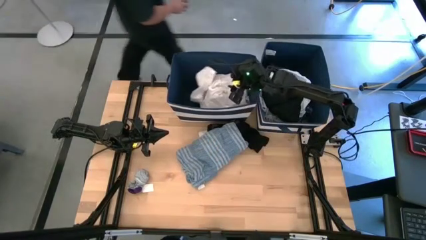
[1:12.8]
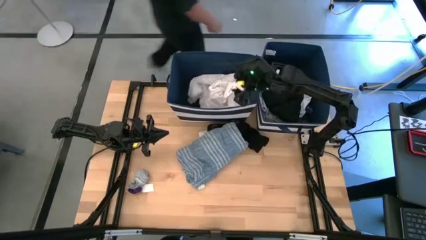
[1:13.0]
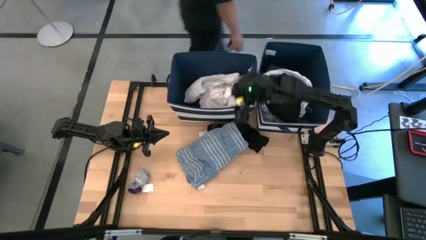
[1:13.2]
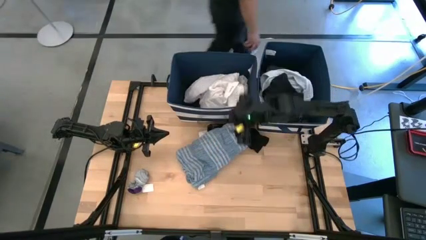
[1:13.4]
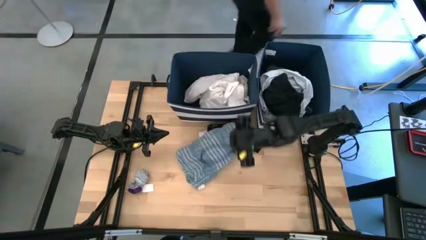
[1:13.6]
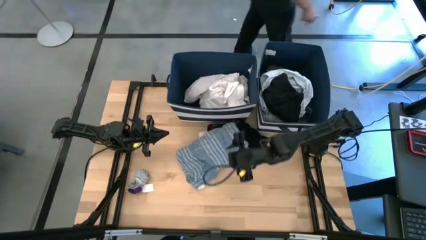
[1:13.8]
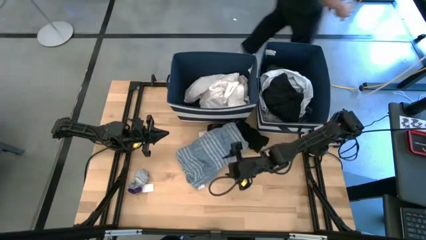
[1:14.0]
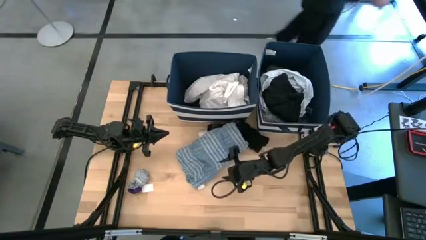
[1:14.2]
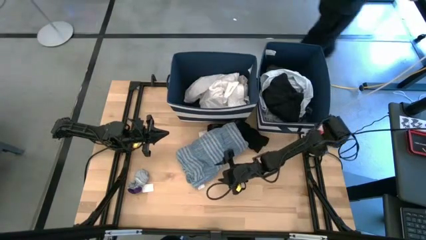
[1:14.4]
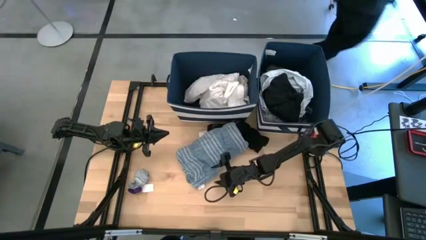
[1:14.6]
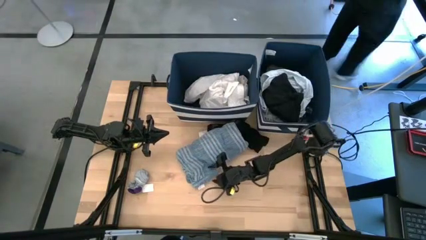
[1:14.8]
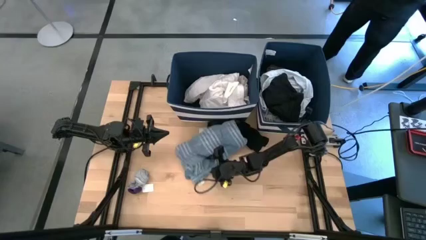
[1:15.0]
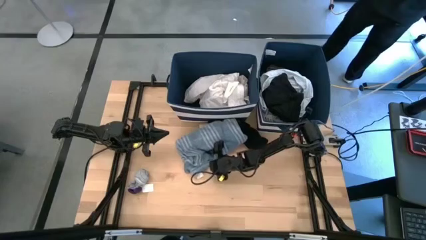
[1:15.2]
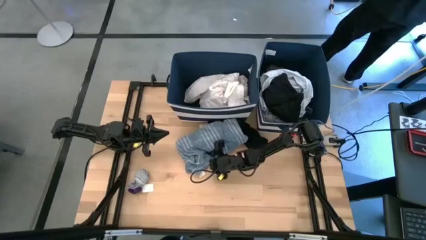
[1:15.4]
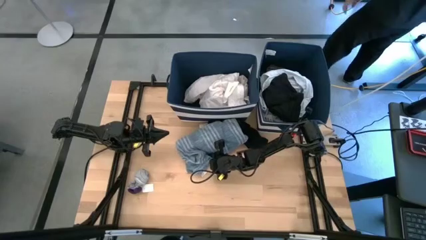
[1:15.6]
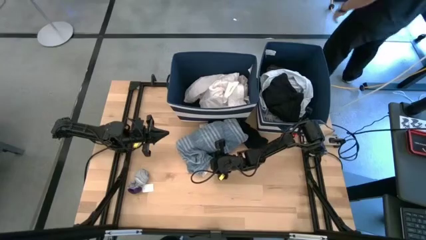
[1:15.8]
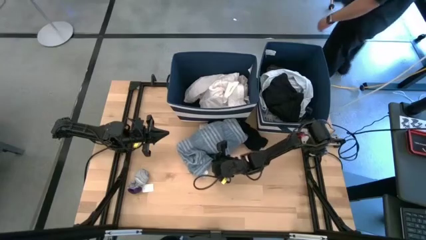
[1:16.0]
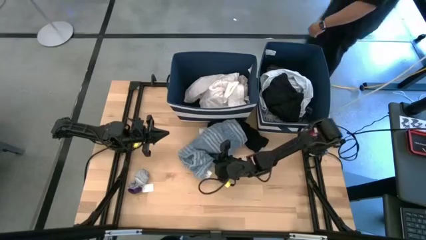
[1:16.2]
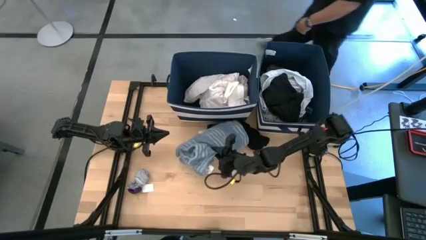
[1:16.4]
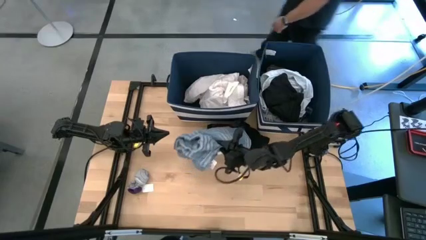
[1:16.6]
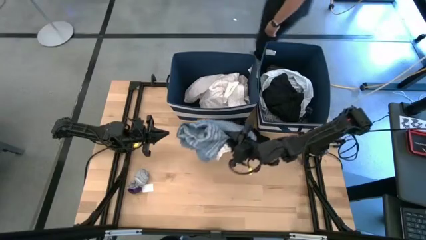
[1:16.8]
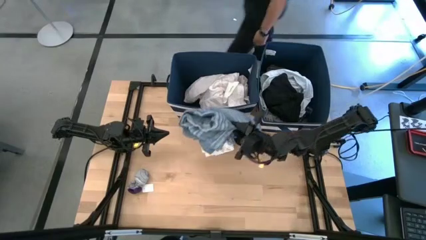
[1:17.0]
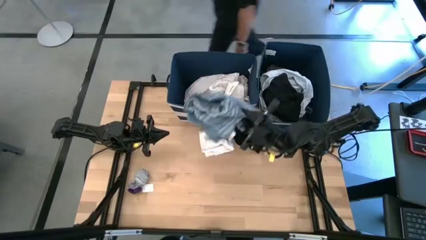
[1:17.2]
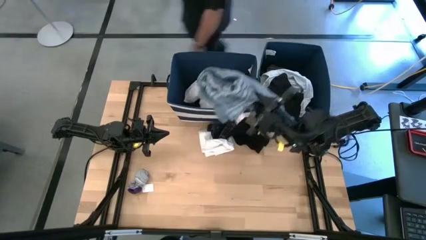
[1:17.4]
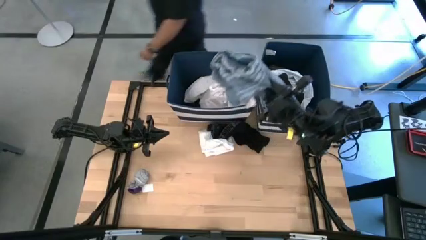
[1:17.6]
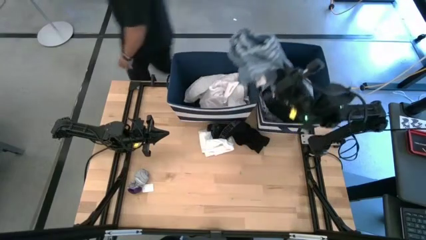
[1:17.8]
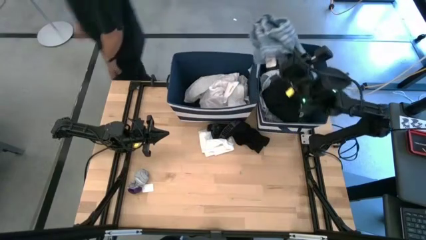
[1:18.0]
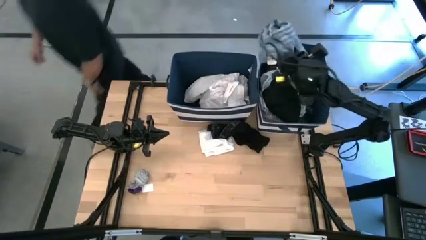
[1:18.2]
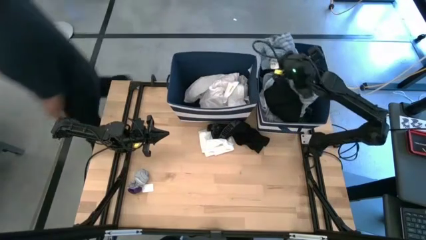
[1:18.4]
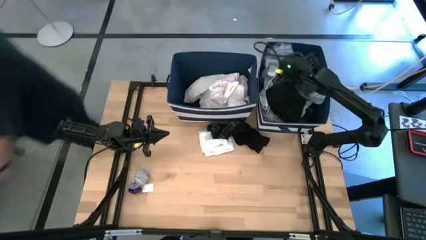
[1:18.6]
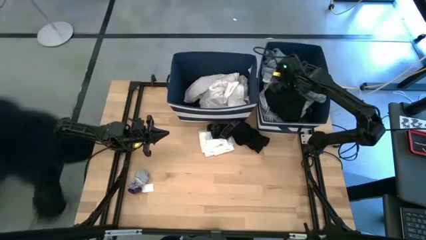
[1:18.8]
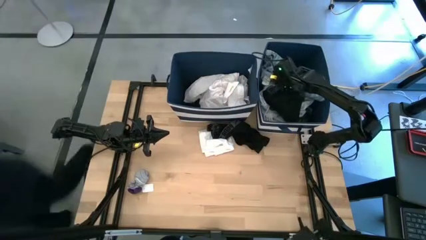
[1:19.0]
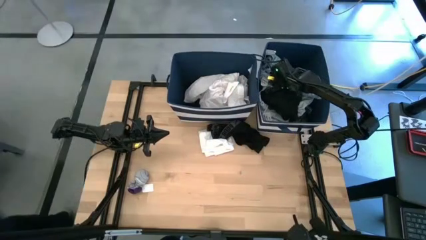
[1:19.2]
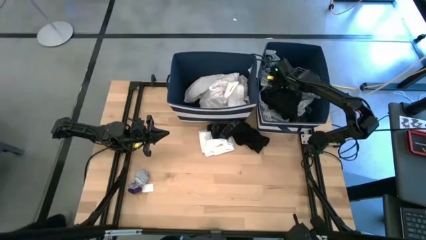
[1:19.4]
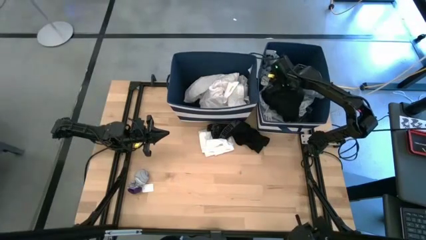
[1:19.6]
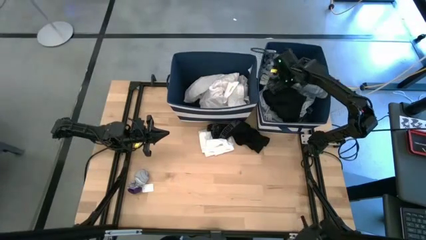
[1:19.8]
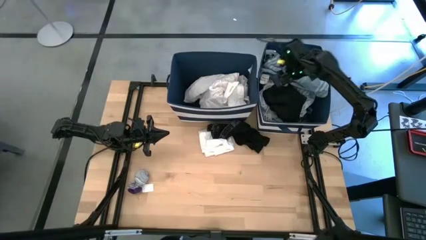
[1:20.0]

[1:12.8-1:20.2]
Task: Sort clothes
Put the light blue checkered polo into the right blue laundry organizer

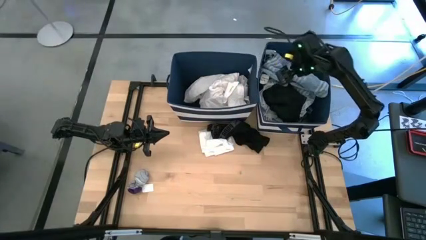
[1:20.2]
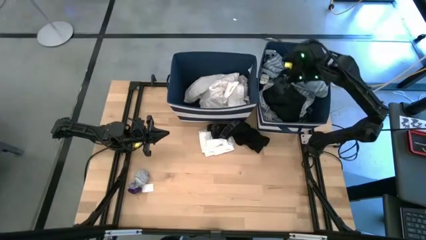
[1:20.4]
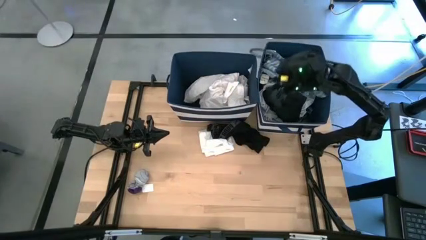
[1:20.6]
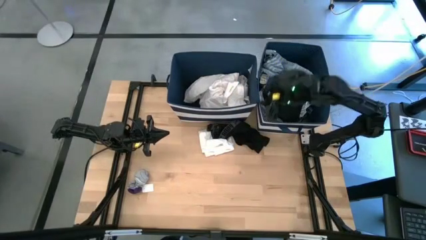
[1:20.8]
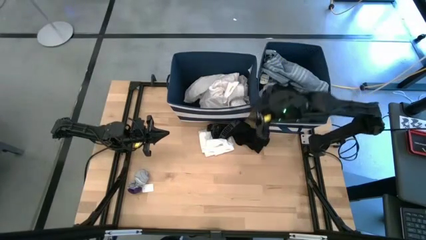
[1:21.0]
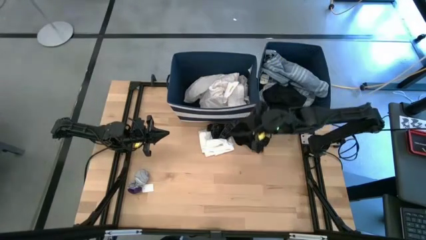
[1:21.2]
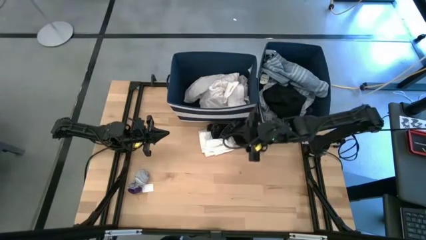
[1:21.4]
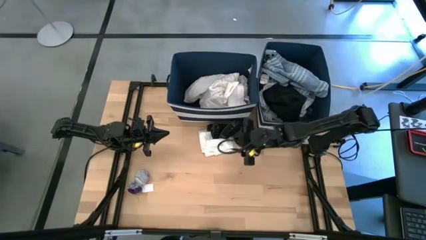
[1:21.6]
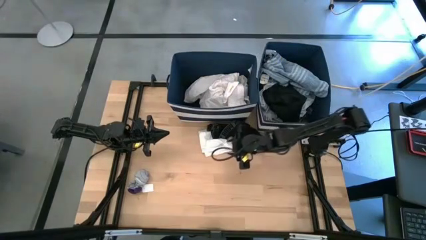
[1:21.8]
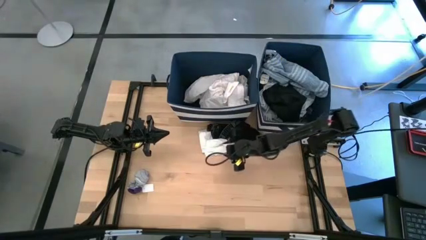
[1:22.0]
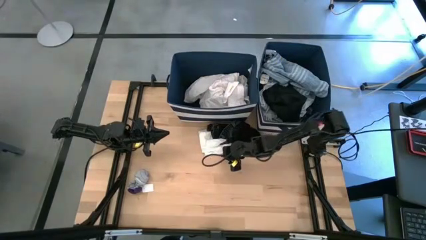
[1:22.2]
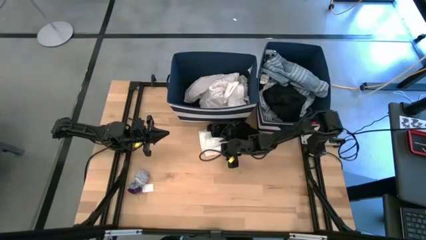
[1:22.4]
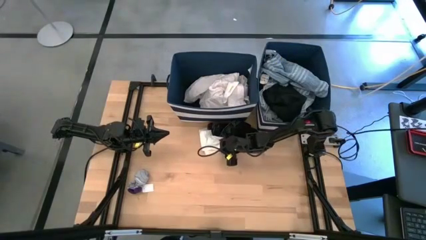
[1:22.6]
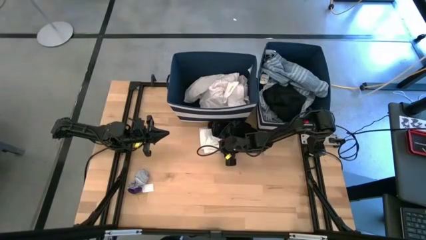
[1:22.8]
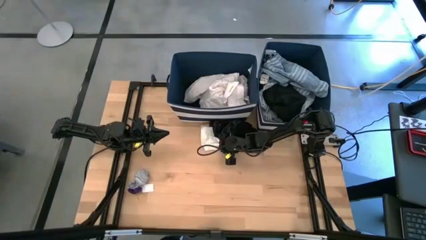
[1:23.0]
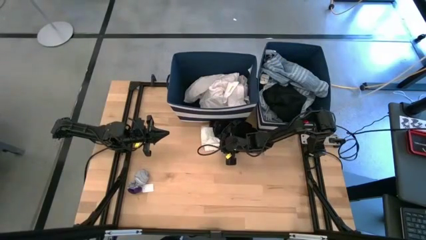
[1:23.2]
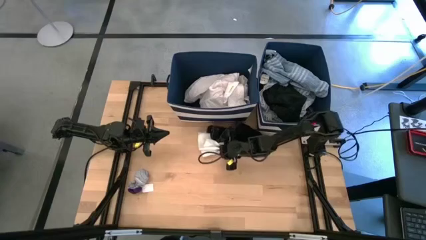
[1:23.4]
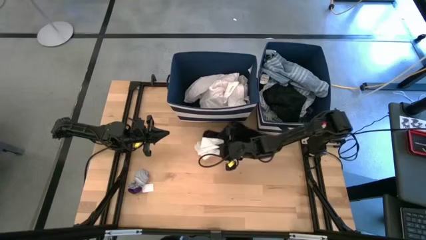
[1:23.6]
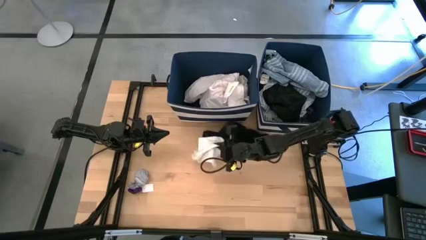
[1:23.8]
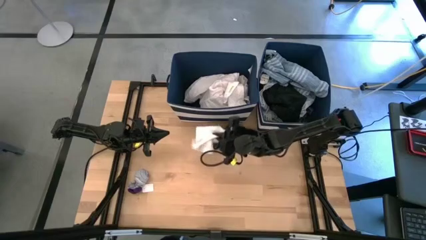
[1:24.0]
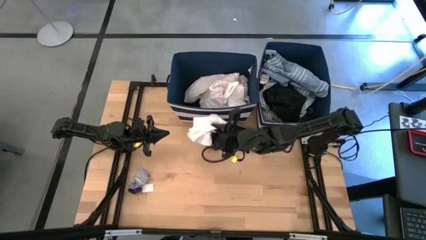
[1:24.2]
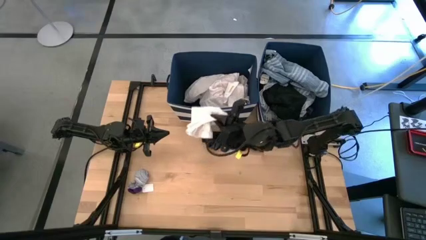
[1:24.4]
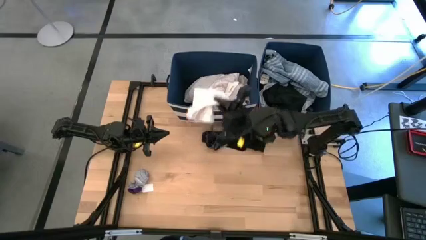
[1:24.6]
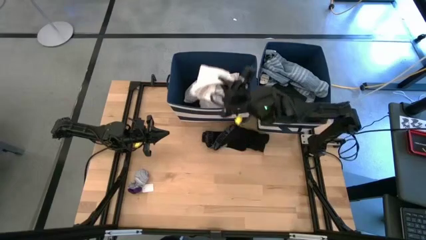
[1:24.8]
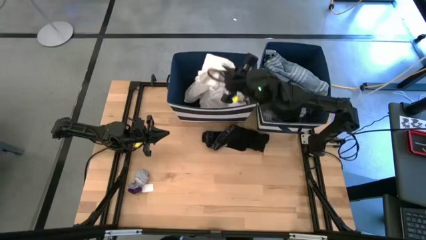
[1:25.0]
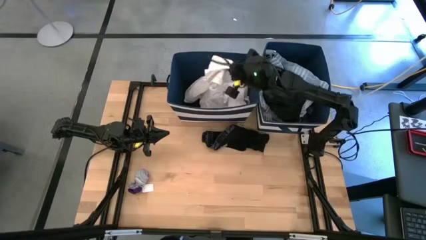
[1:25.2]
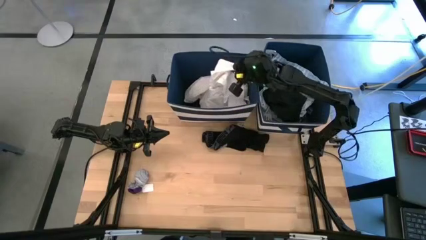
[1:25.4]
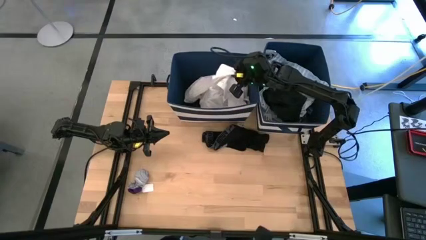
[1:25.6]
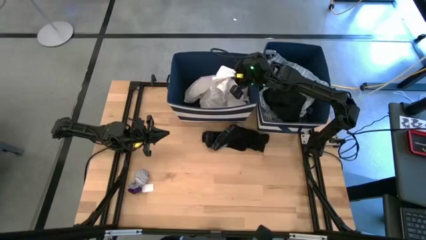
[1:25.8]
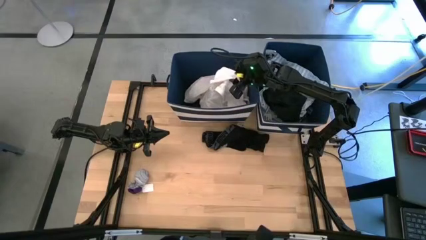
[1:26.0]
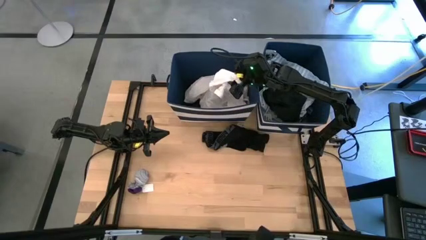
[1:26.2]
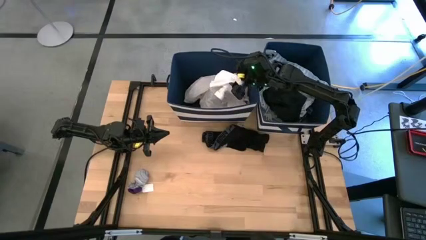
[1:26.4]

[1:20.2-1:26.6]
Put the white underwear into the left blue laundry organizer
